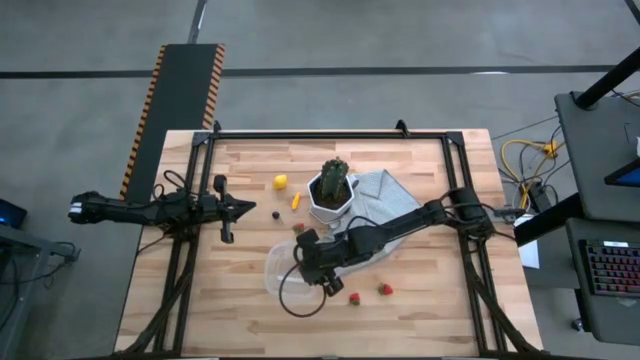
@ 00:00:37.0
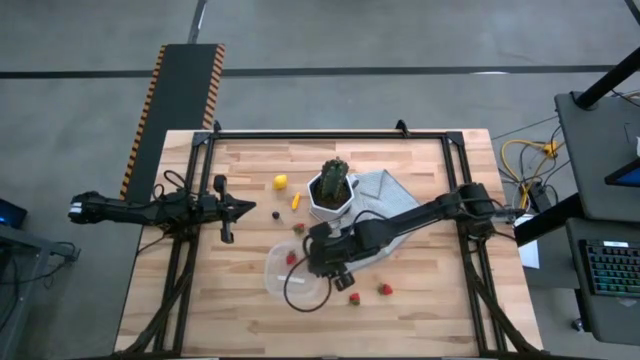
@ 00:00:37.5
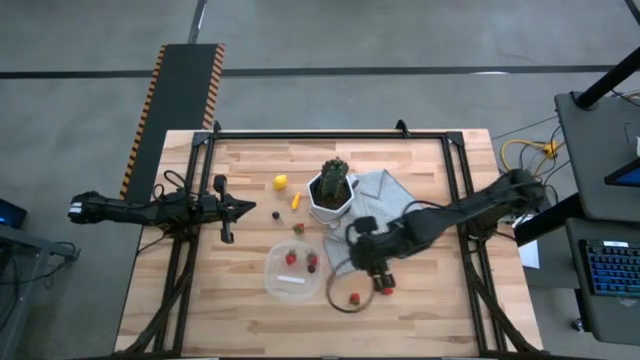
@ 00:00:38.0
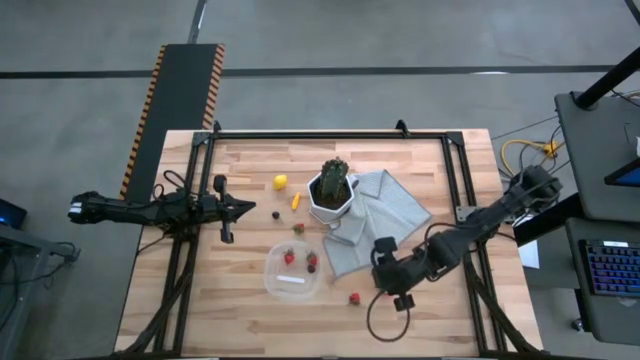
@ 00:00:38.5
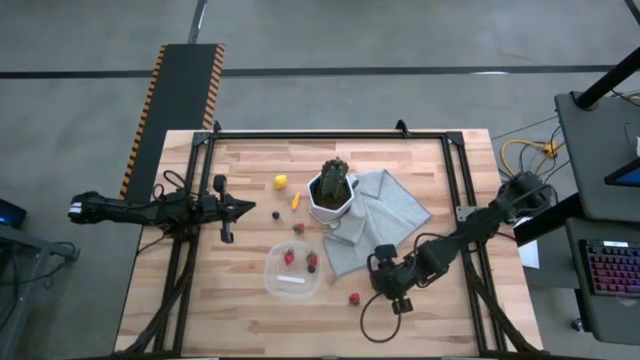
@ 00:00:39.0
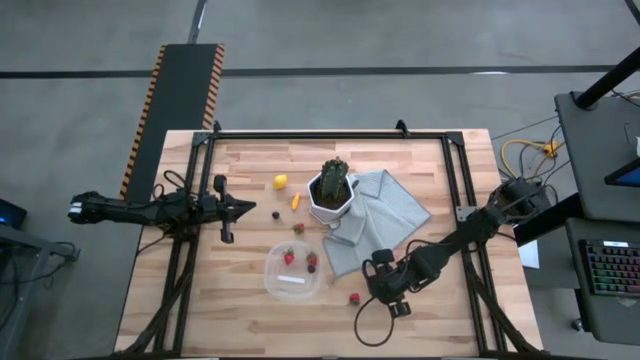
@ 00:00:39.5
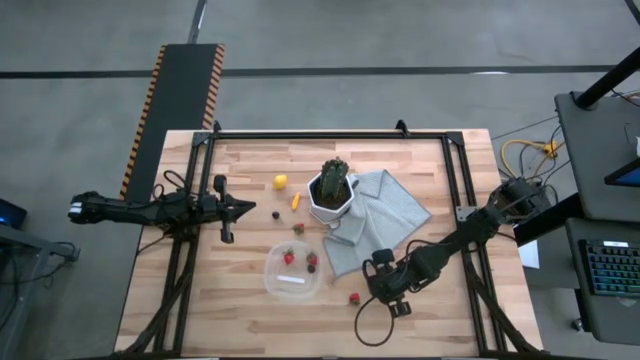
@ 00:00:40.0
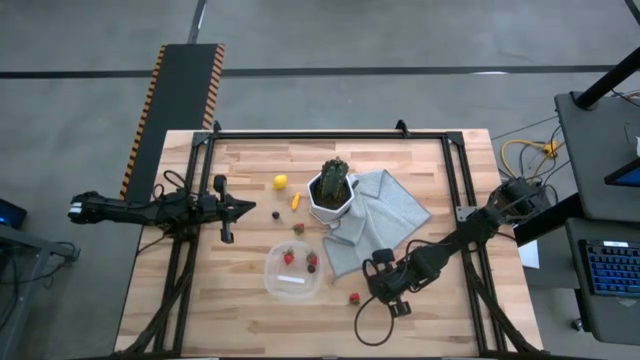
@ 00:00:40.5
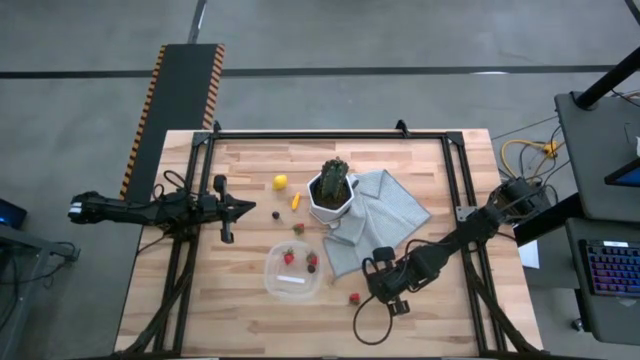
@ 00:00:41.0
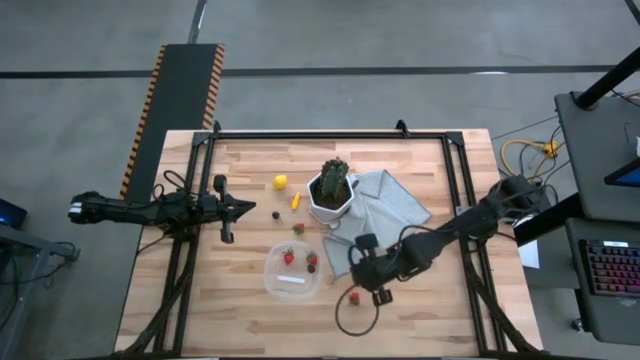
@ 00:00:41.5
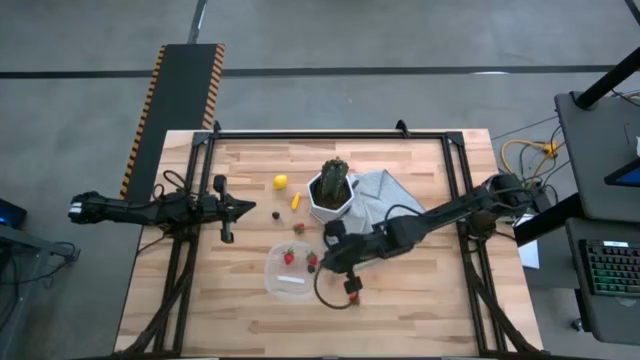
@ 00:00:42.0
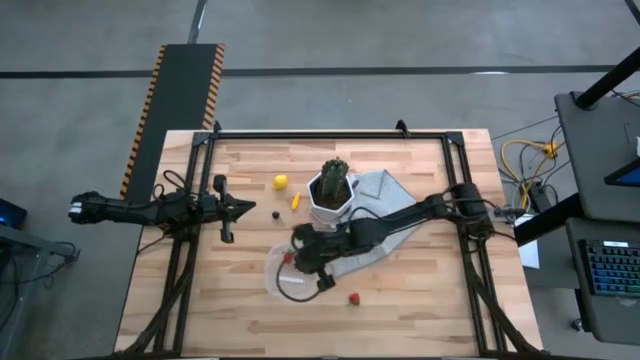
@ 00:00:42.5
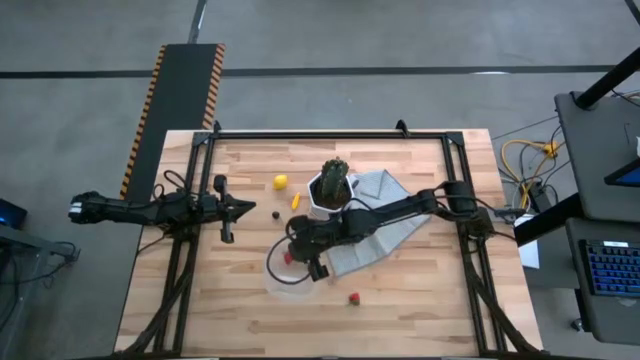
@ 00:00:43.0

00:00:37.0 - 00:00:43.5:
Task: Pick and placing Produce into tupperware
Put the strawberry into the transparent plastic container

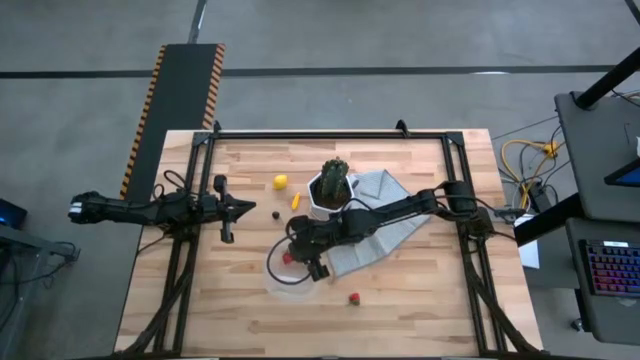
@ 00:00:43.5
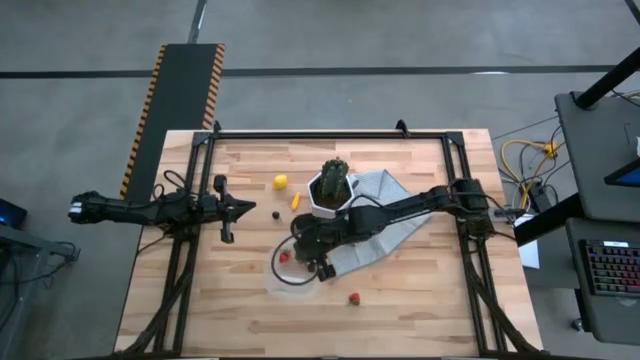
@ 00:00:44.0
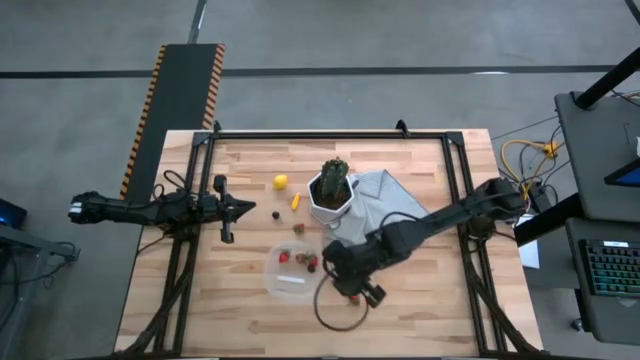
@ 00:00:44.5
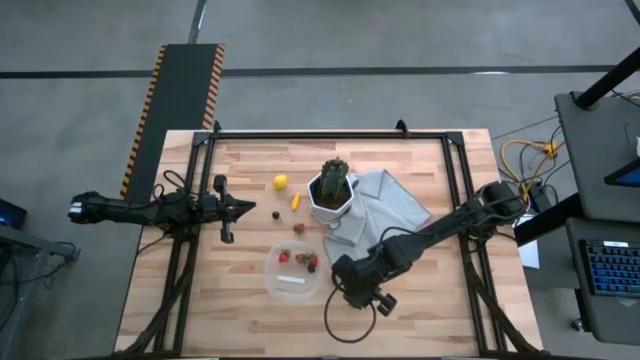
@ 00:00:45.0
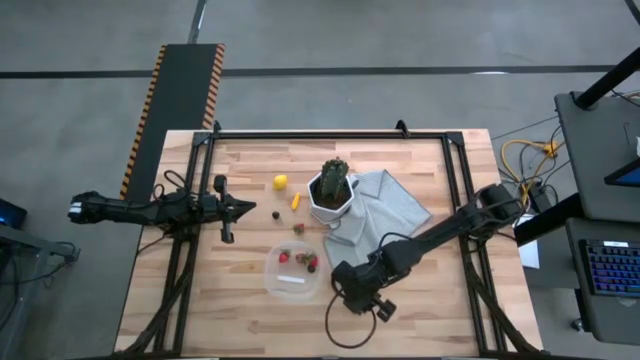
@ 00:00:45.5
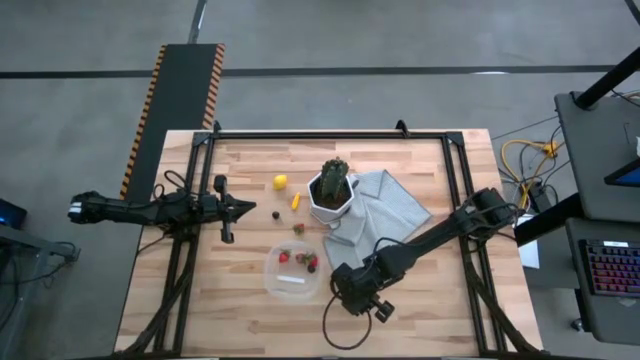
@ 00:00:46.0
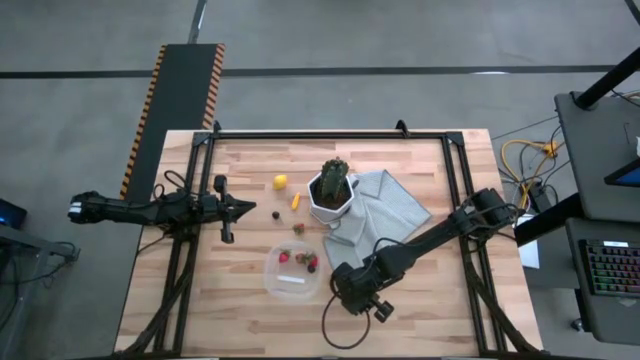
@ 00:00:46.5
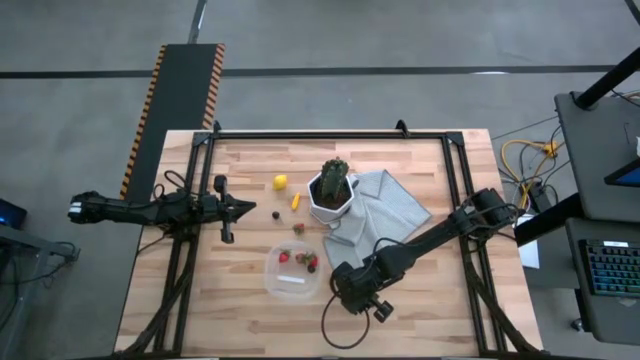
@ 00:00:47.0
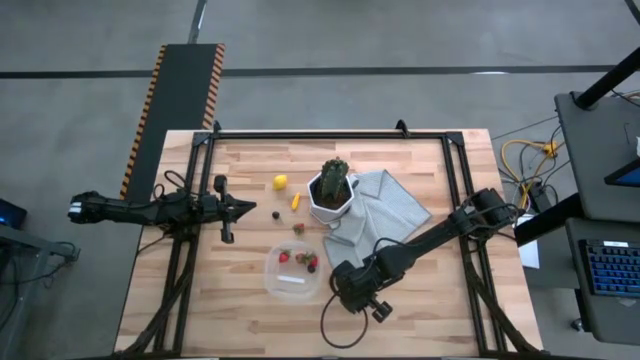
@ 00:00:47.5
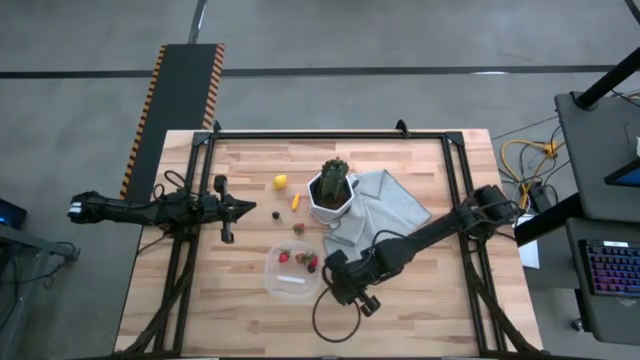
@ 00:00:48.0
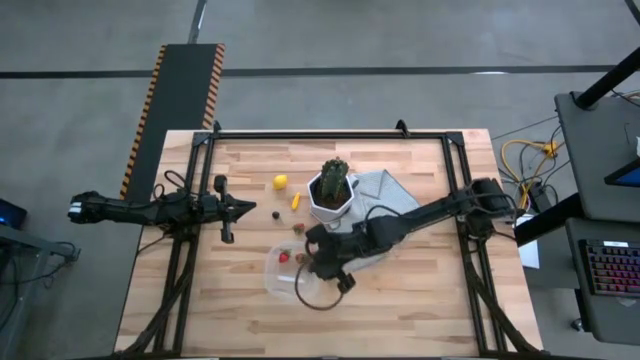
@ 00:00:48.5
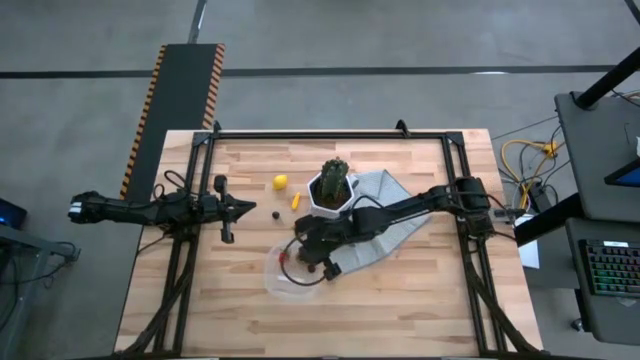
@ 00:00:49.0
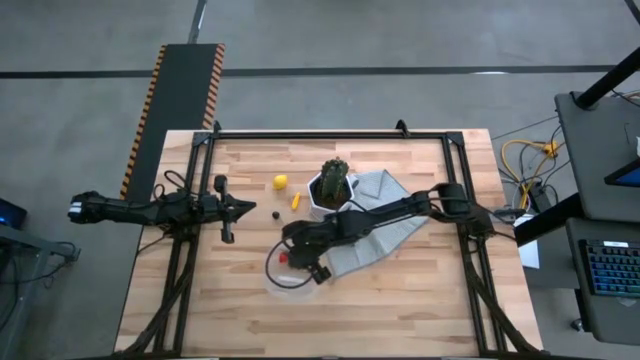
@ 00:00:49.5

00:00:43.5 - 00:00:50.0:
Put the strawberry into the transparent plastic container

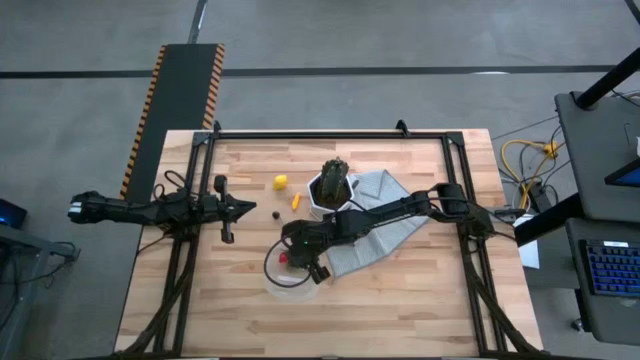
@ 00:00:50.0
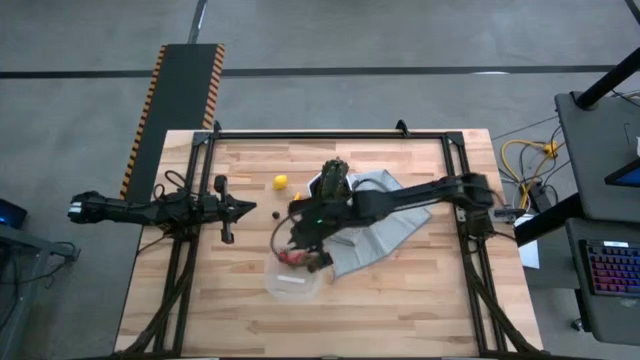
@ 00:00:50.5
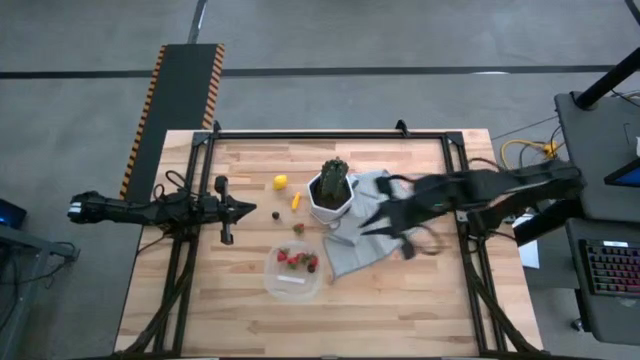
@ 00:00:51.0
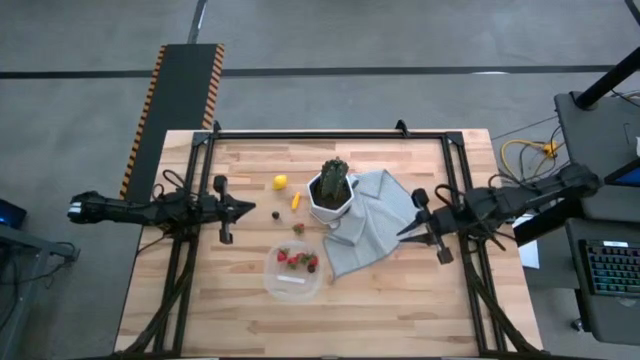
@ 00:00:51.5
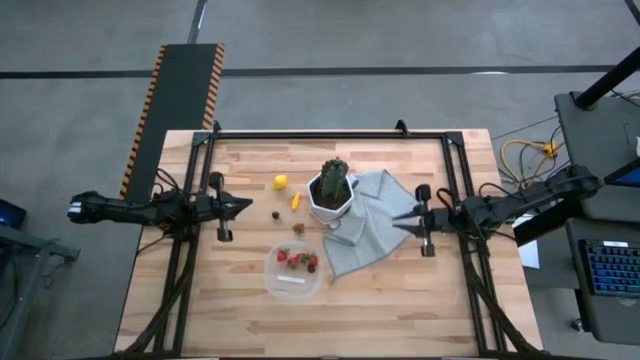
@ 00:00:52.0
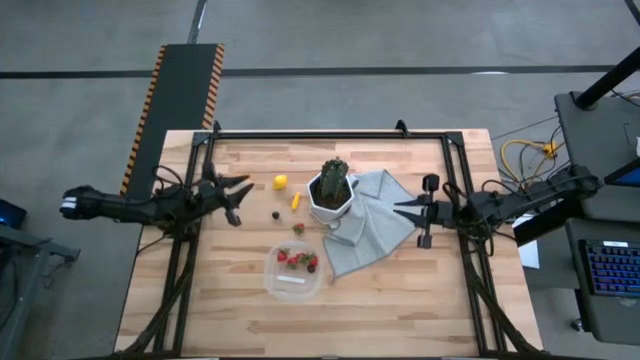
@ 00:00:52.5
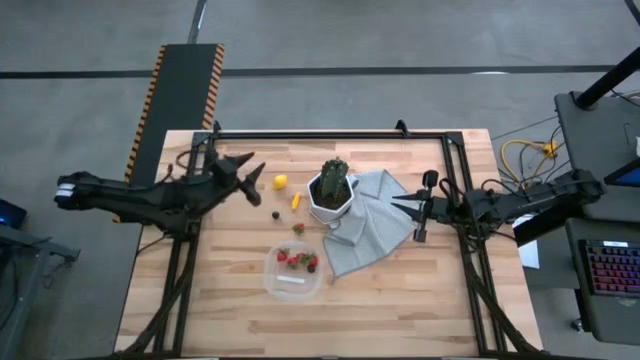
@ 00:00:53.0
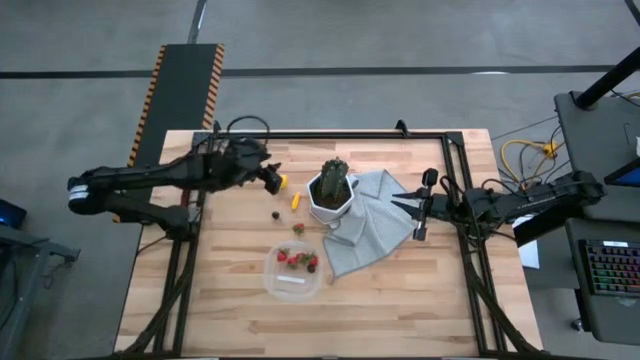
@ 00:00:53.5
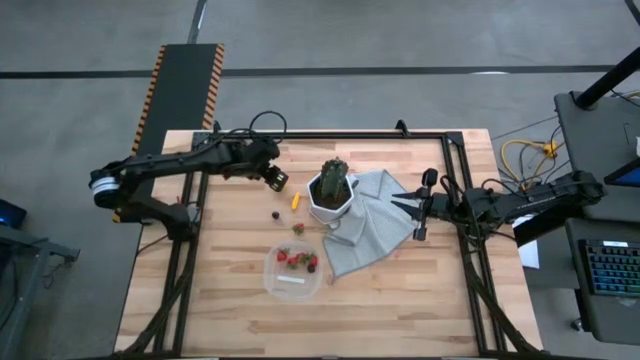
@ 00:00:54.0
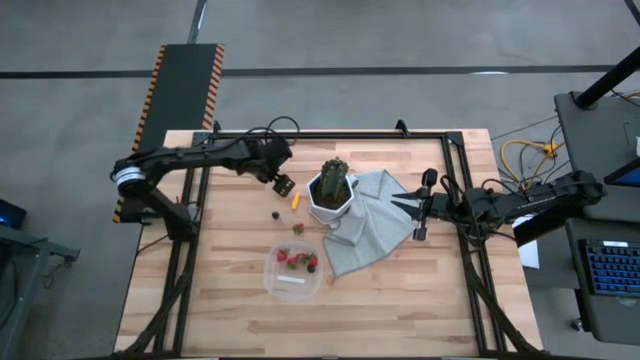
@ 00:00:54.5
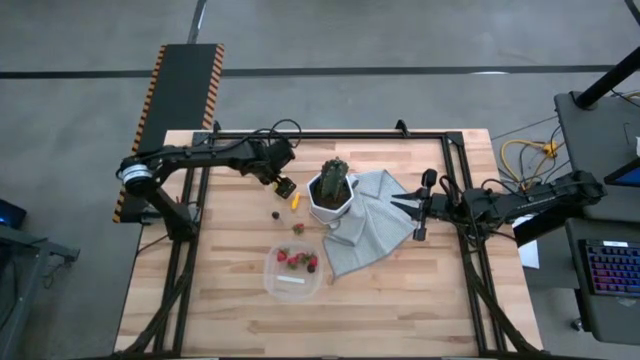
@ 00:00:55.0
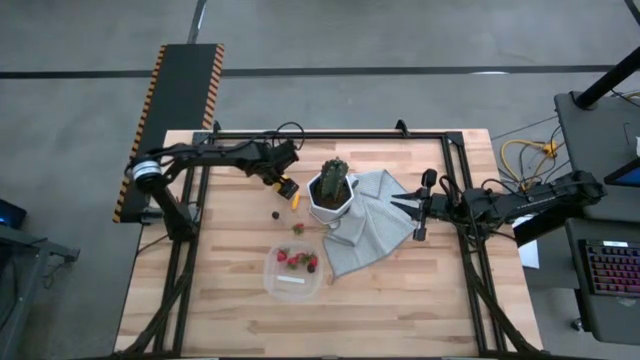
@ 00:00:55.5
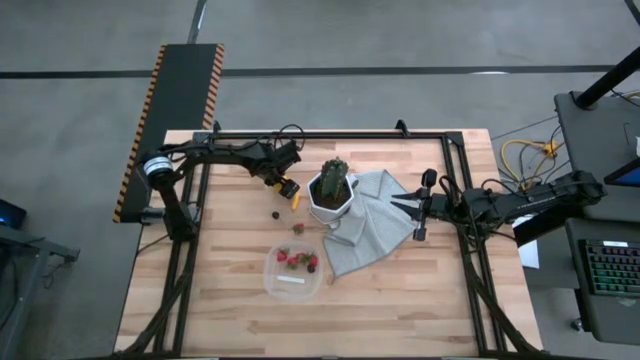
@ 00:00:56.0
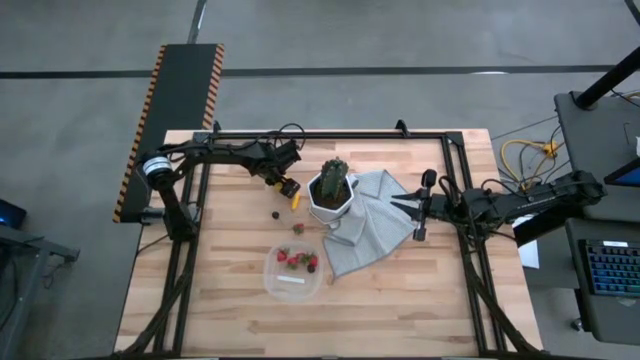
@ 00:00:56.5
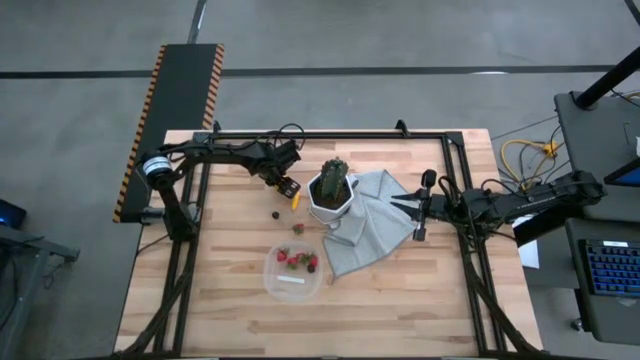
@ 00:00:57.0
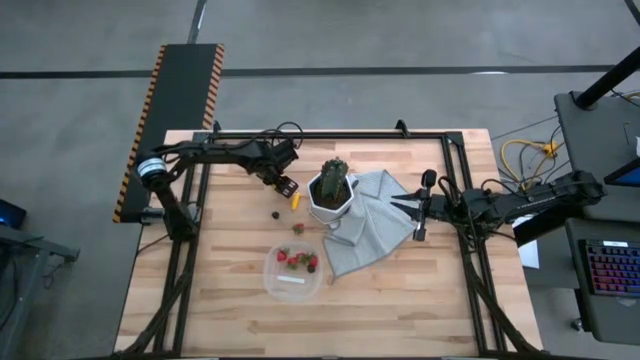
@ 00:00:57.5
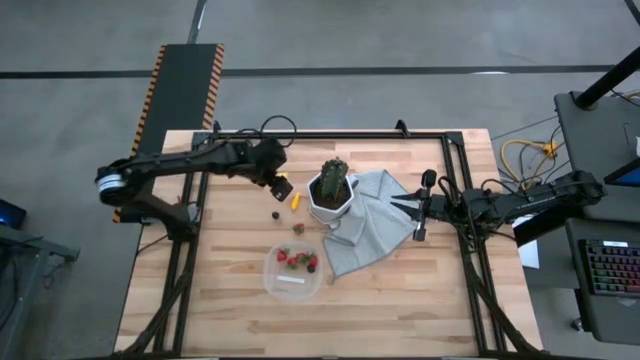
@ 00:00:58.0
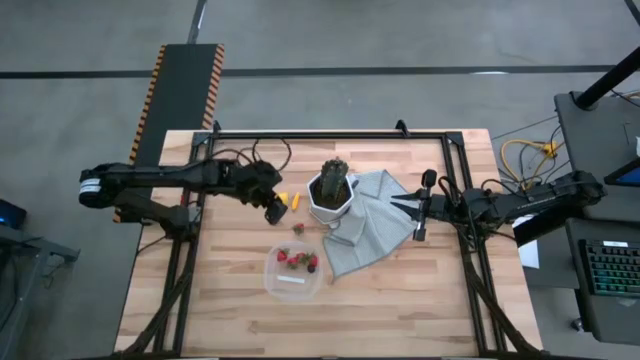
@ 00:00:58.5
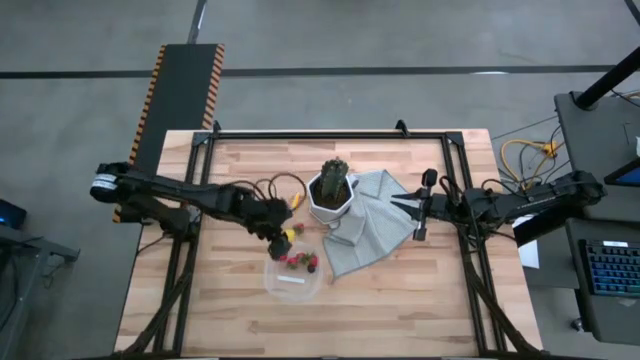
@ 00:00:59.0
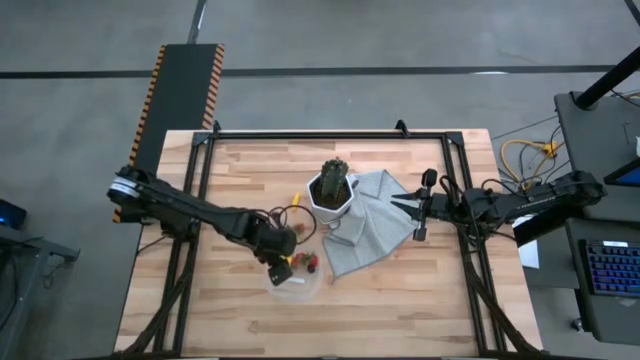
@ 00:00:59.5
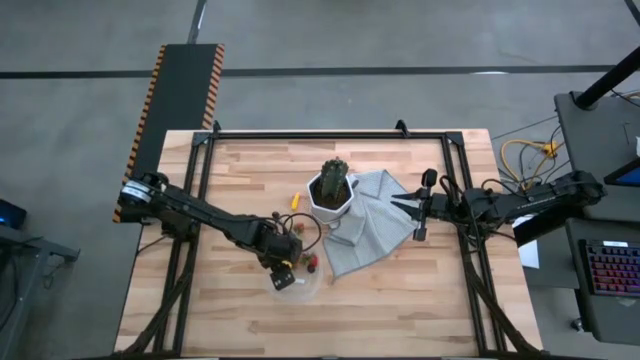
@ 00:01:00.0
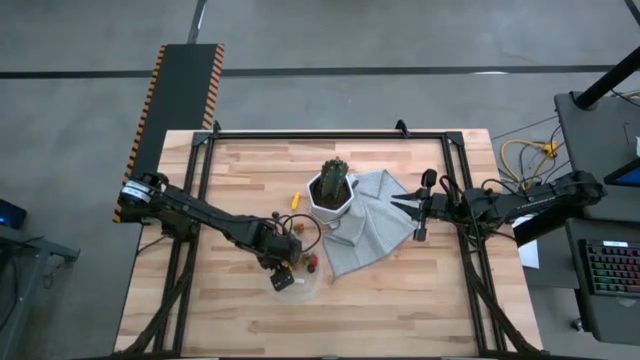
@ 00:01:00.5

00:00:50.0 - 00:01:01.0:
Put the lemon into the transparent plastic container
